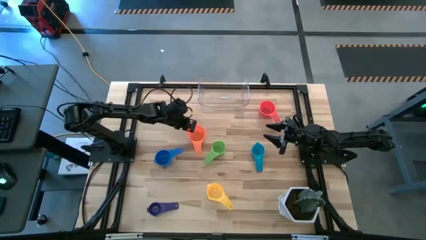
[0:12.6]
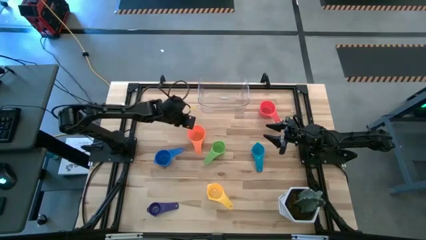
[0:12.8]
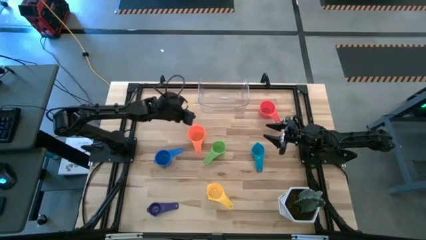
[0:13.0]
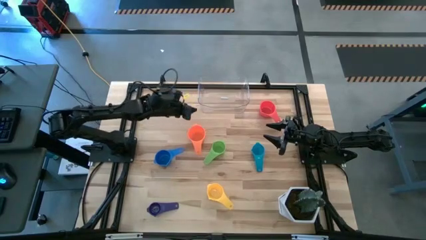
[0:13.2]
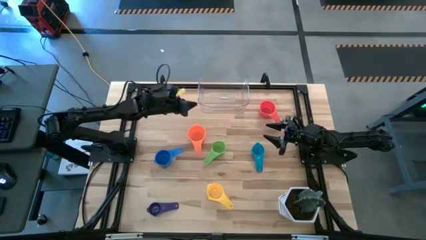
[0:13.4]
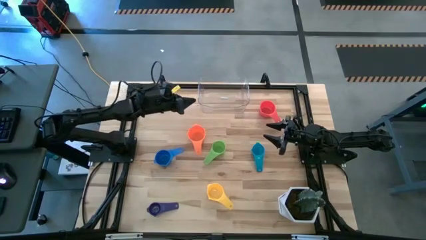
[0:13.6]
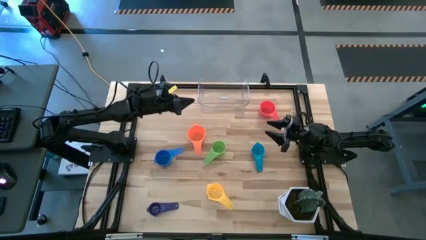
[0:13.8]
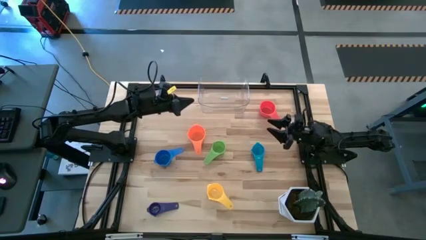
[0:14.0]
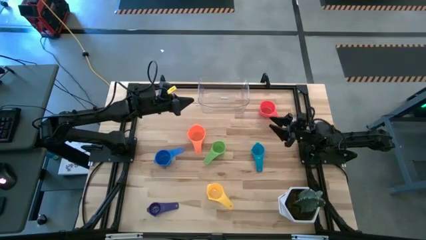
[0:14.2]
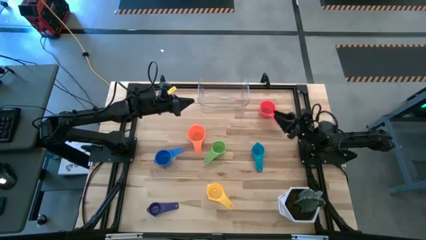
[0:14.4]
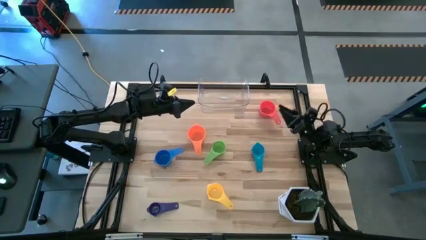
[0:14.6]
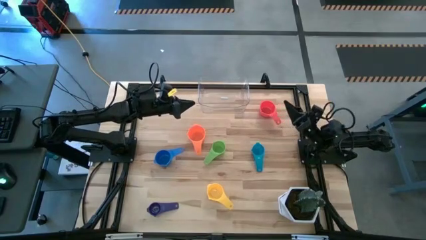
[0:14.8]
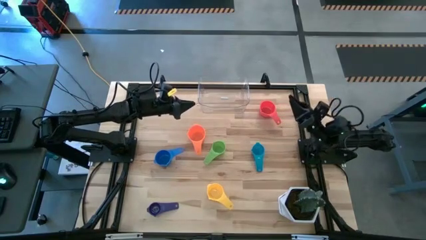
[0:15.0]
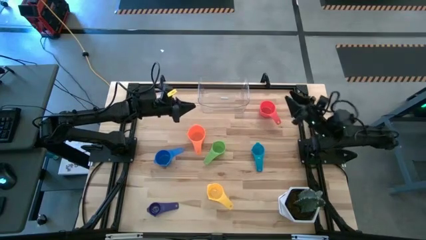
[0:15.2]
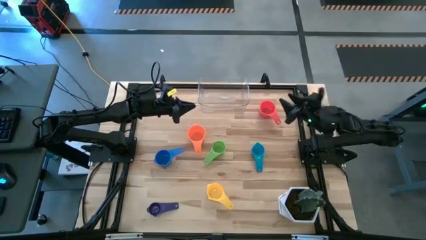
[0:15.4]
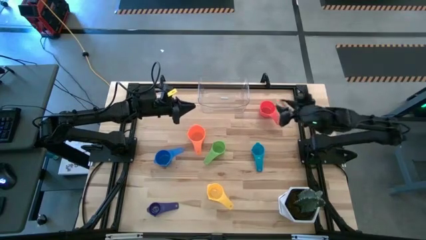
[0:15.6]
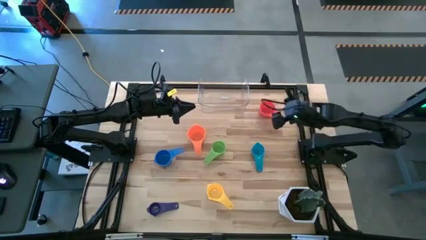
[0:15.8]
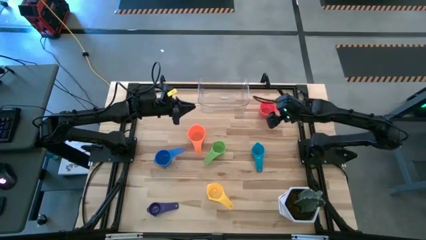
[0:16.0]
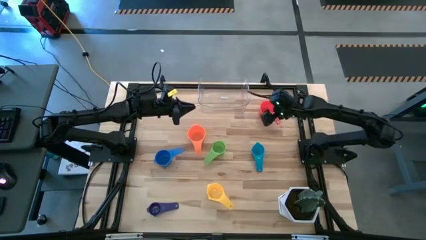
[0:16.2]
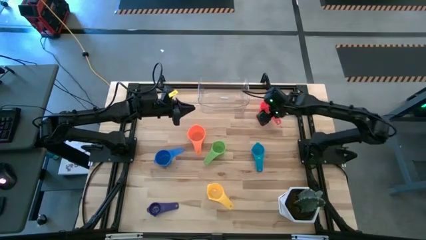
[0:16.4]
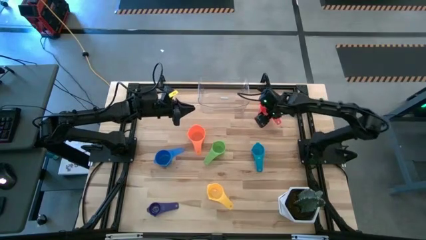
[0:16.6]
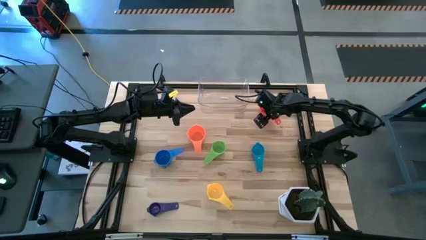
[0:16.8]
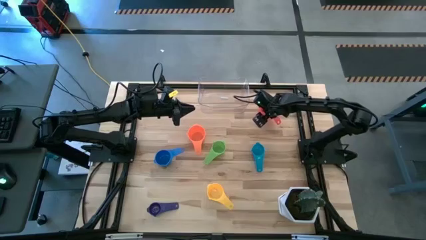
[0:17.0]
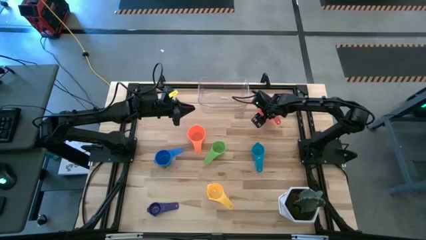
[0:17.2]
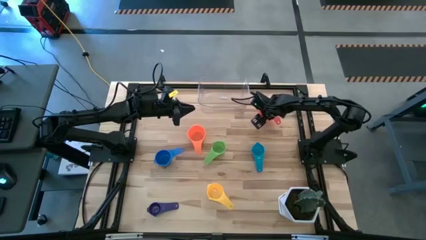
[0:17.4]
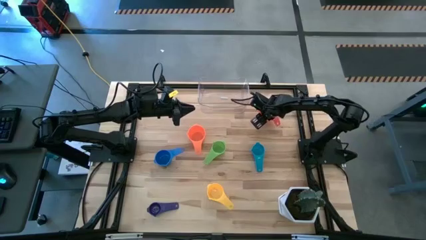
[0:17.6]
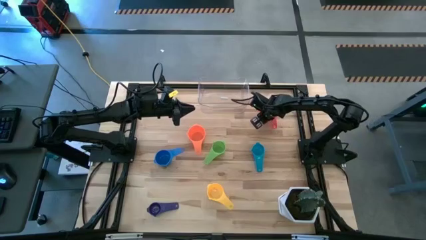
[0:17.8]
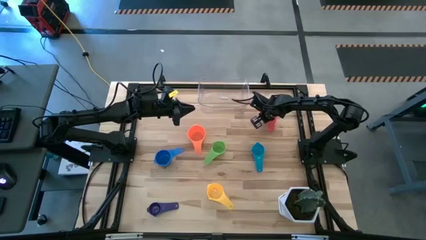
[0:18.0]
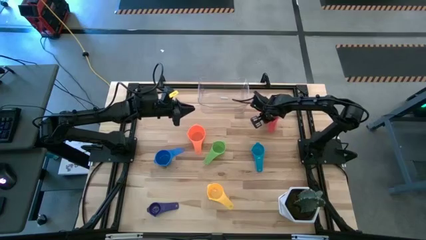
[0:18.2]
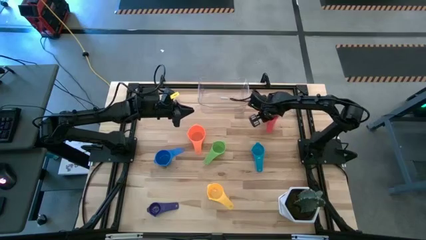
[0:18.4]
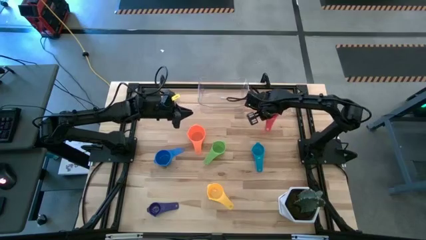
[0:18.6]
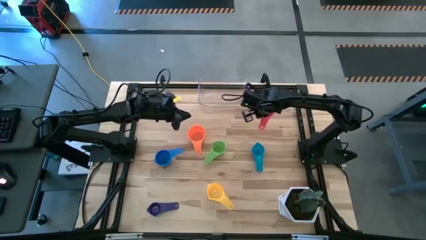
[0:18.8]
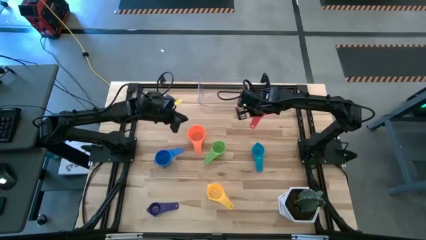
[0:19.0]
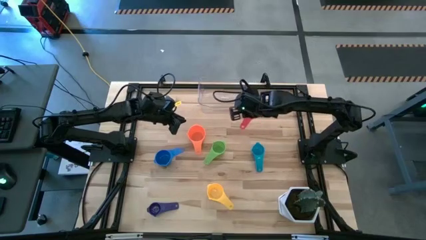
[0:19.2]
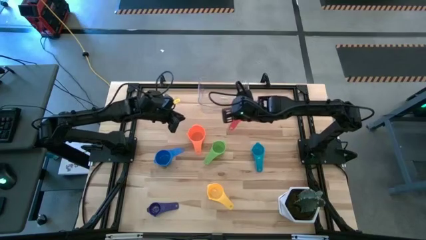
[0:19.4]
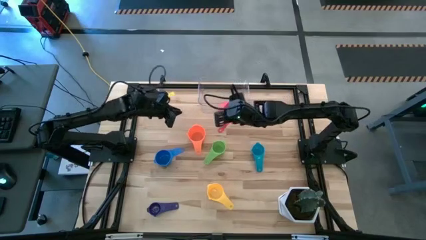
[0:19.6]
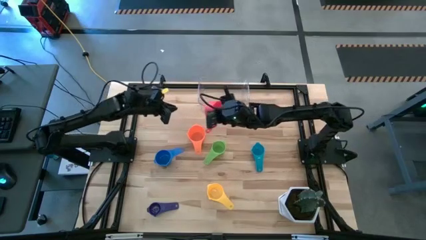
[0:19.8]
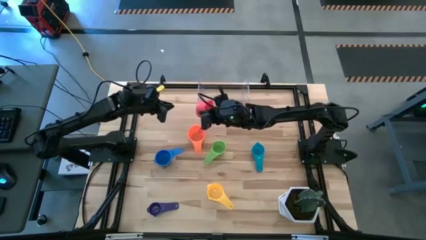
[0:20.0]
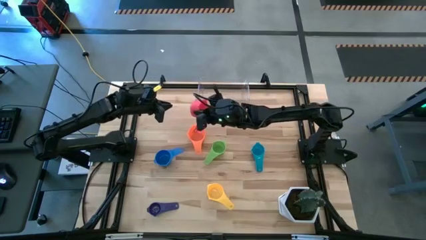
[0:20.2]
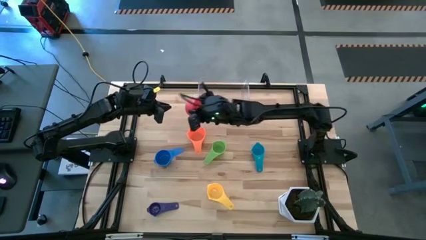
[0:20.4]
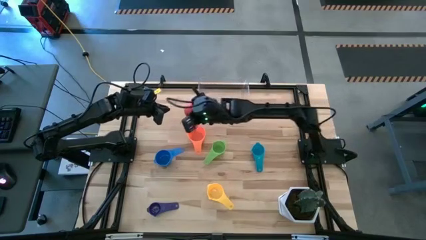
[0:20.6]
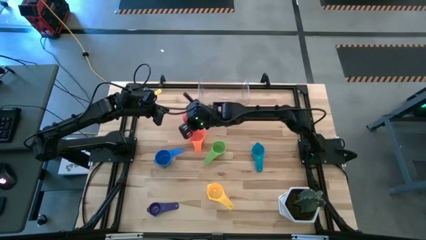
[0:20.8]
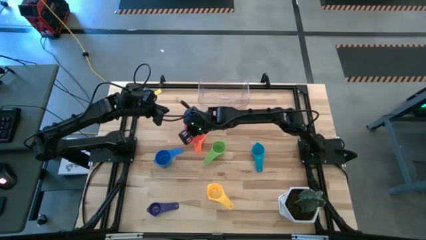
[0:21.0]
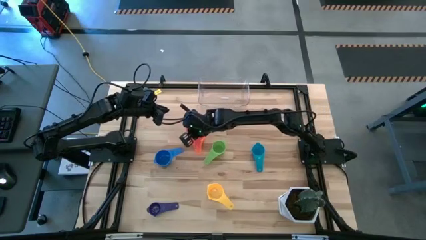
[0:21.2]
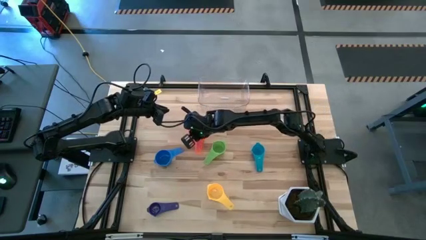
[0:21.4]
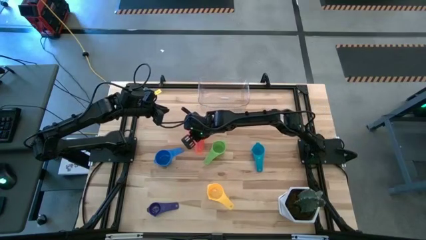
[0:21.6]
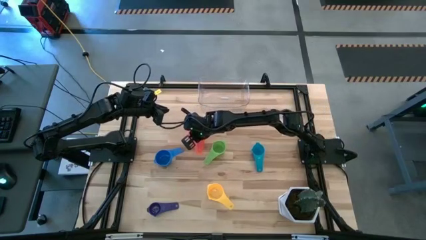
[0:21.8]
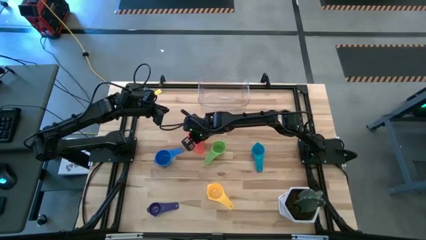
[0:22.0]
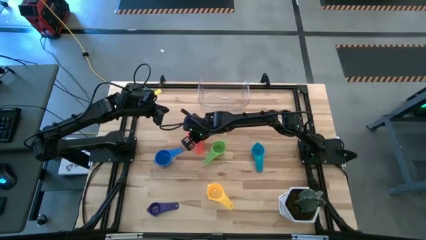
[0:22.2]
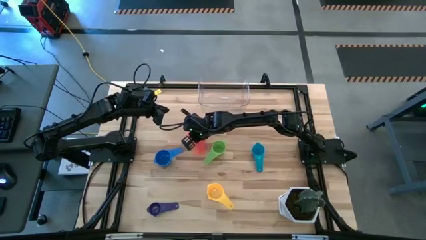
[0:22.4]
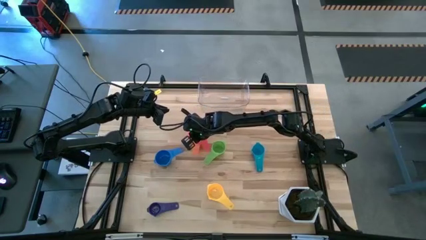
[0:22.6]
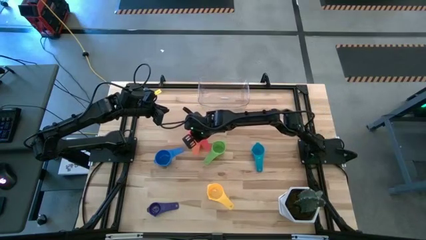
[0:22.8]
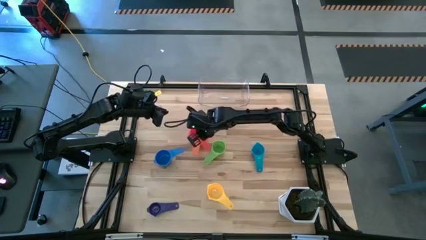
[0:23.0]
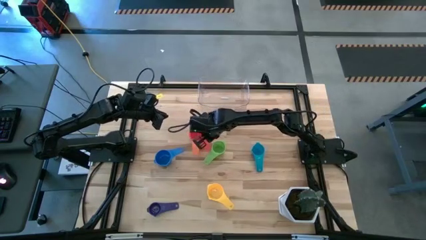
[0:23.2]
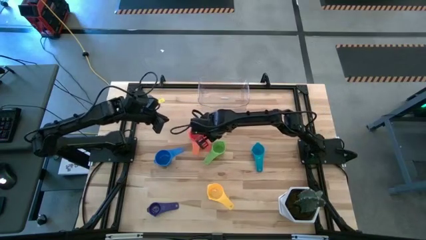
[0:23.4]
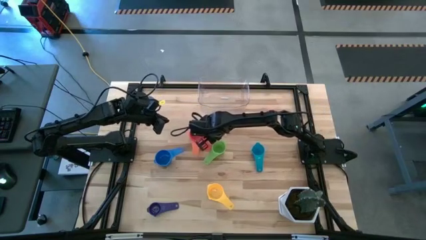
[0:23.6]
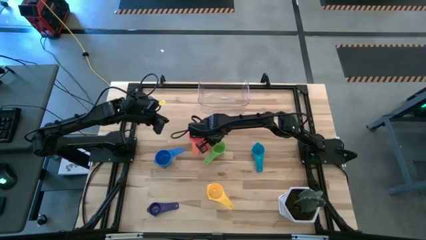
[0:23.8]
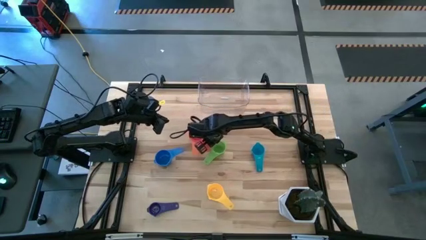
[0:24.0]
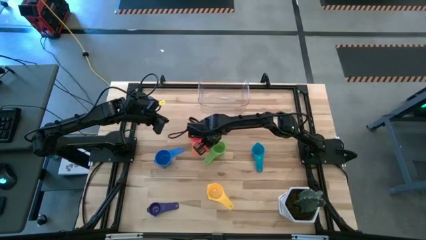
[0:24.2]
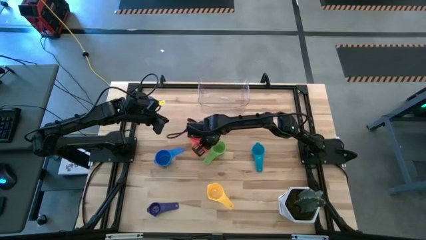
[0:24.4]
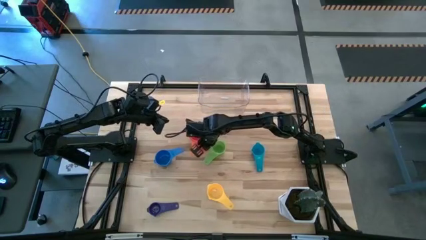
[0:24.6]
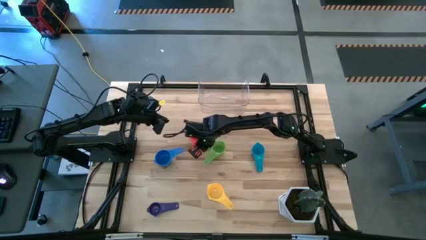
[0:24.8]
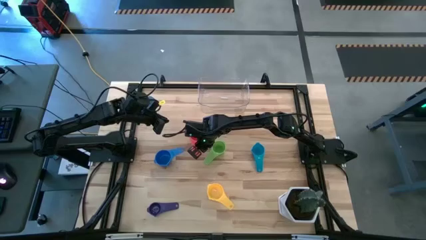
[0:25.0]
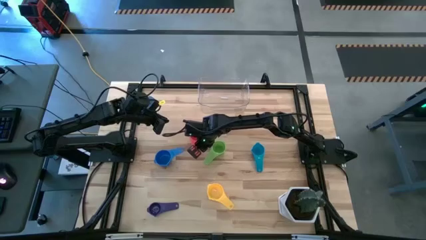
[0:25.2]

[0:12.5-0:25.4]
Task: Nest measuring cups in basket
Stack the red measuring cup on top of the orange measuring cup

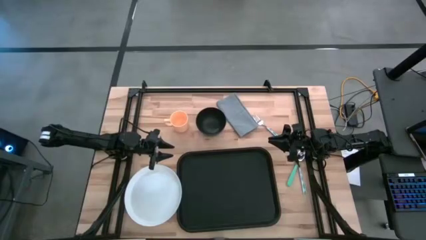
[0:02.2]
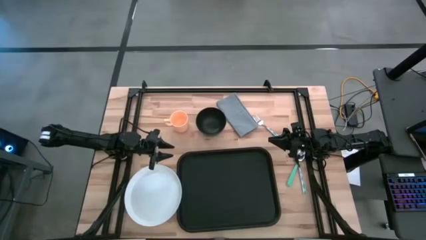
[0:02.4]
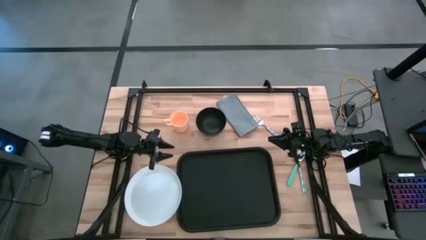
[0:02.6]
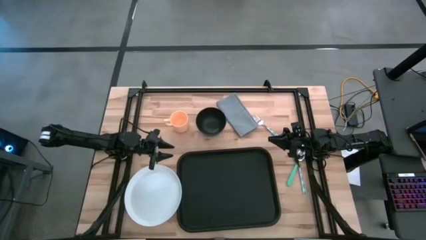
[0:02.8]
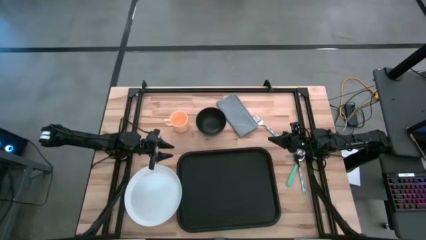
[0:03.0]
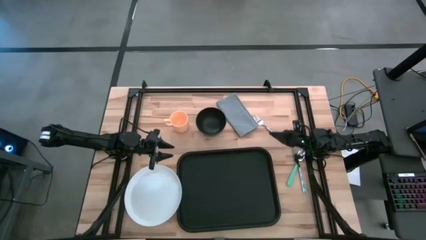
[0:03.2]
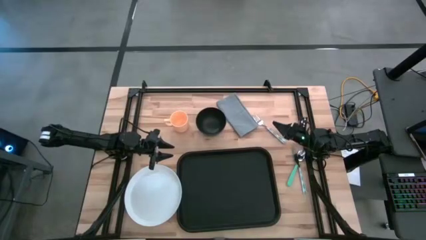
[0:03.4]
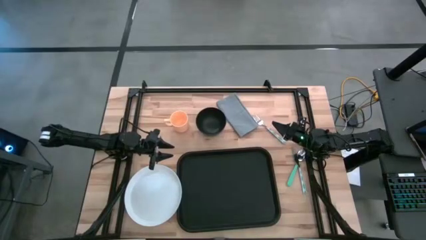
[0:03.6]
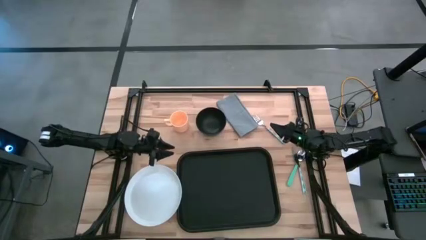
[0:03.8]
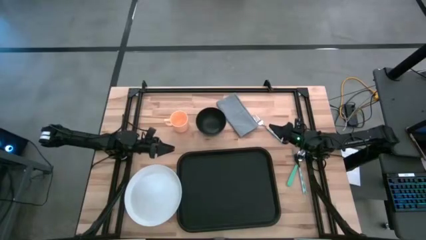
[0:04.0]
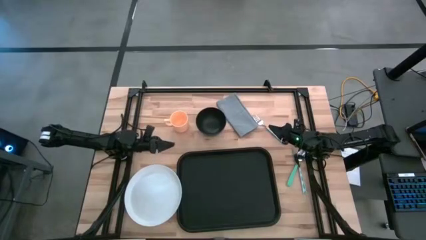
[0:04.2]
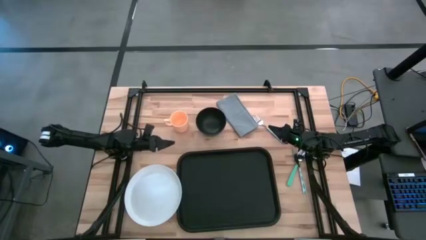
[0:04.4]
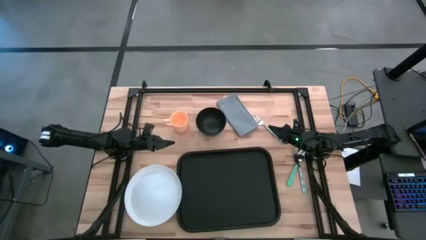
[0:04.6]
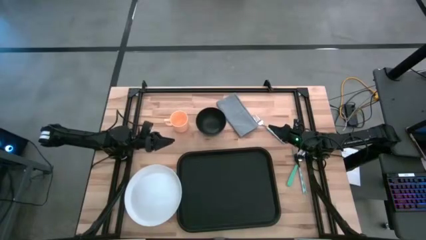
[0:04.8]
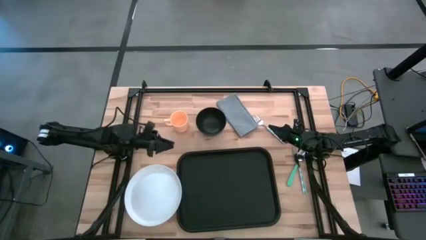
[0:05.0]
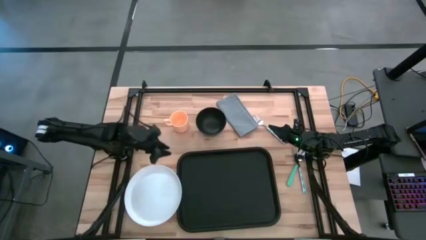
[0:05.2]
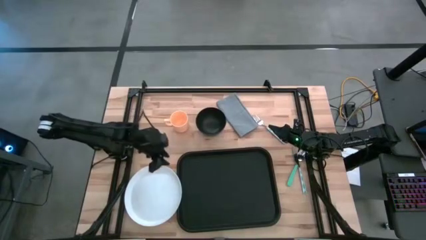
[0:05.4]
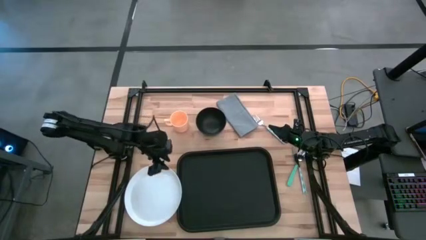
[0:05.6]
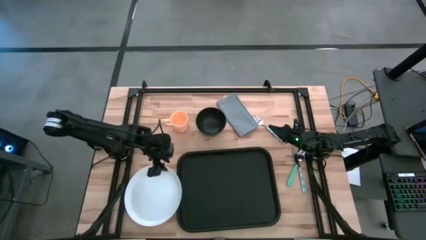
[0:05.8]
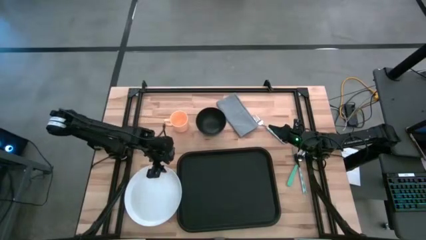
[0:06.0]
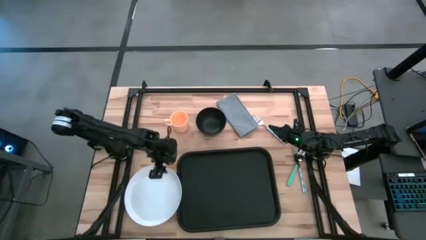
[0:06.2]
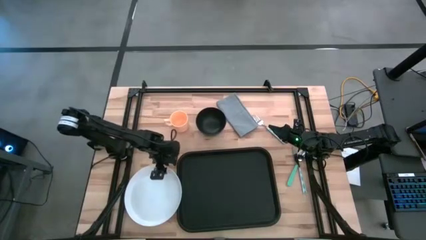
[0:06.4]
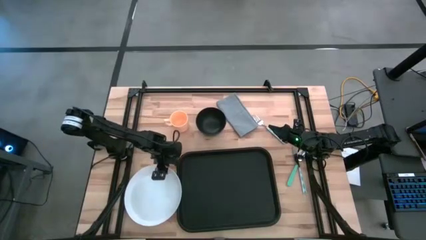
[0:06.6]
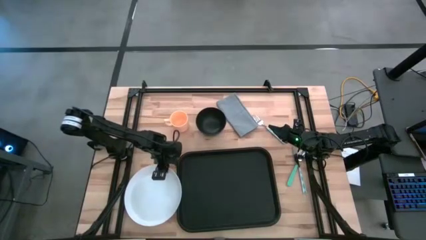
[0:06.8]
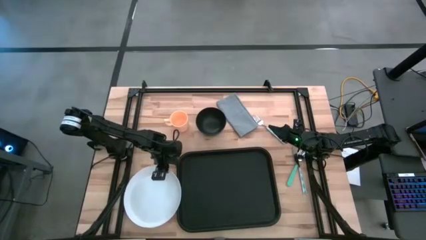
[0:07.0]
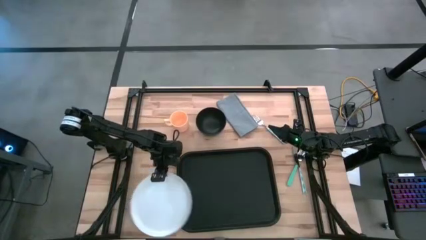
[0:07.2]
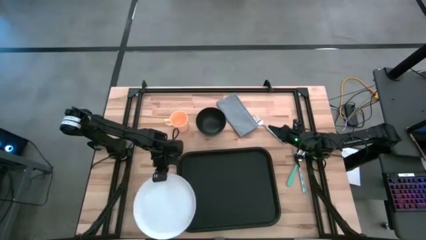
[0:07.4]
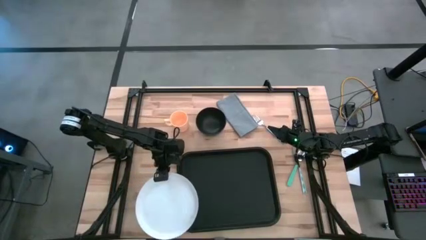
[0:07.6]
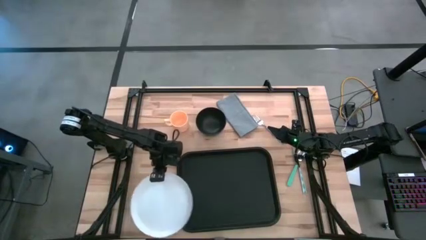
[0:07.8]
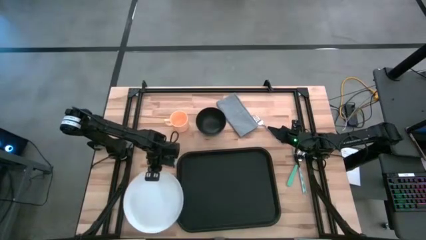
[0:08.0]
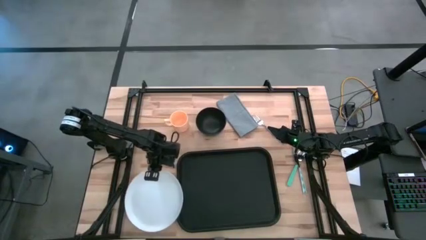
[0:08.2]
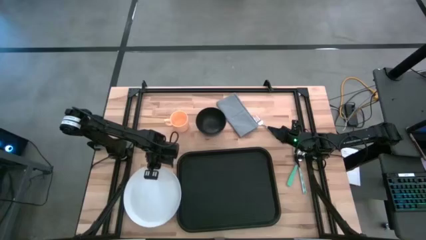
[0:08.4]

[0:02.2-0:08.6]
Task: Set up tray
Adjust the white plate
